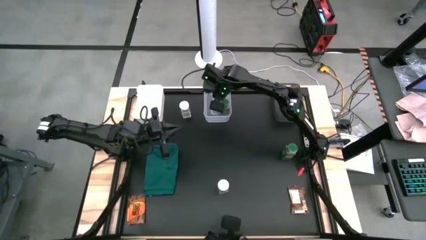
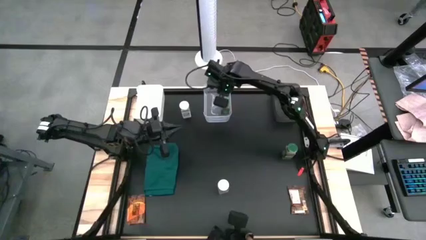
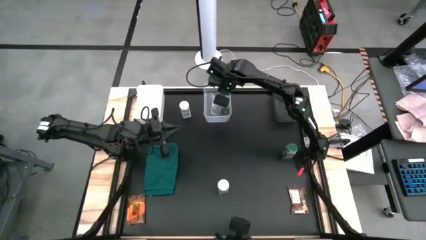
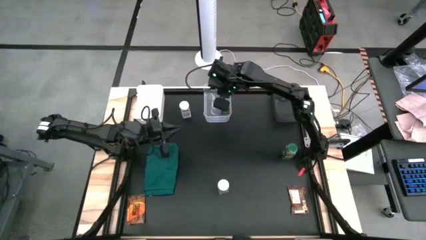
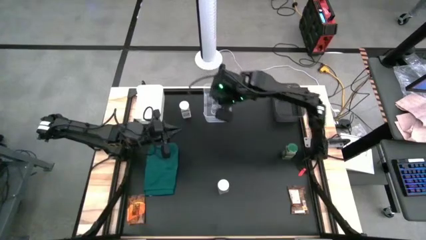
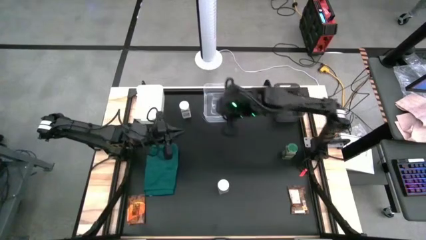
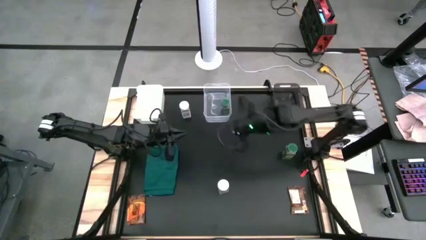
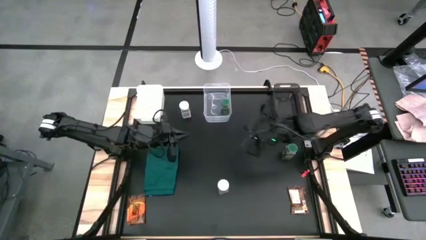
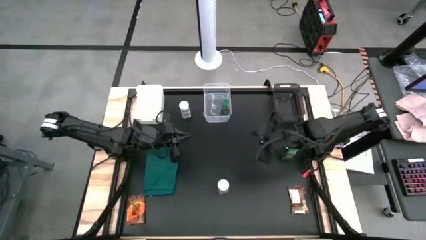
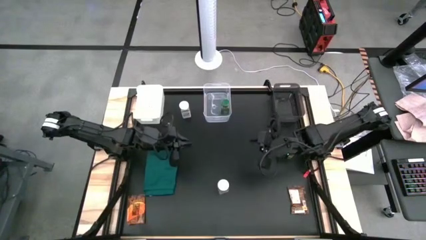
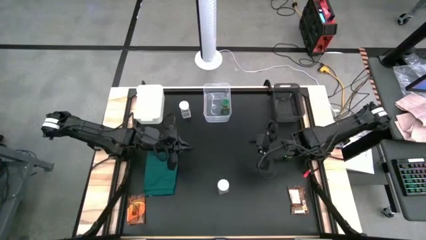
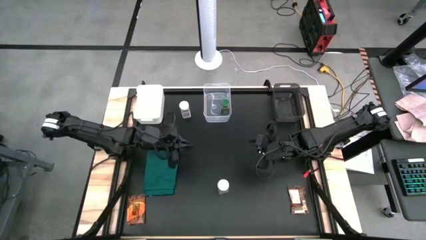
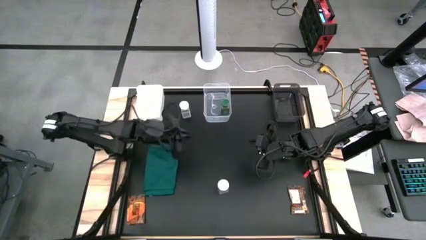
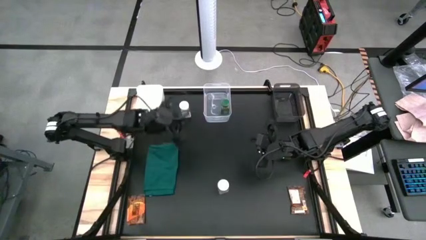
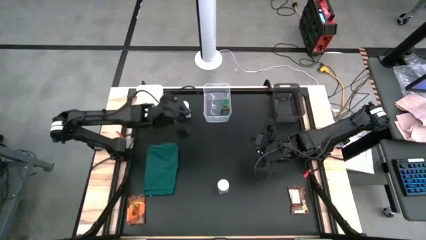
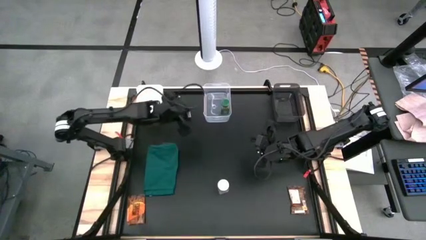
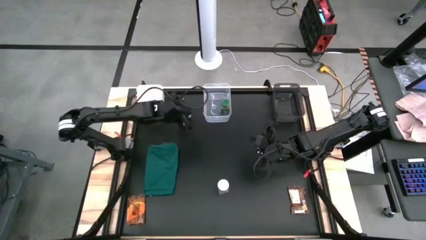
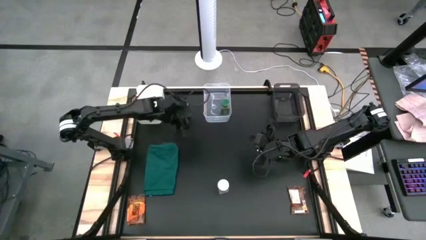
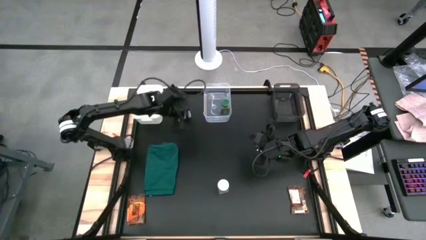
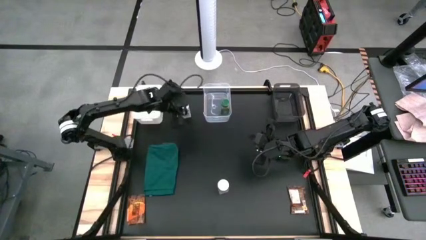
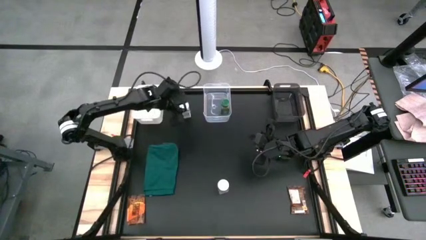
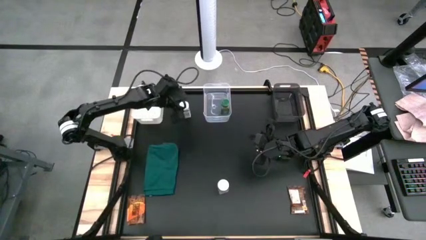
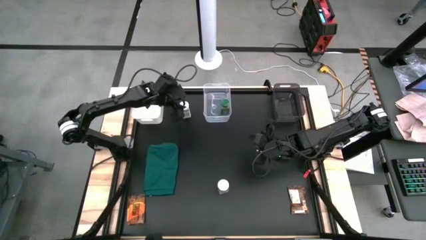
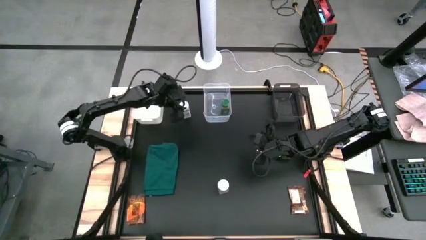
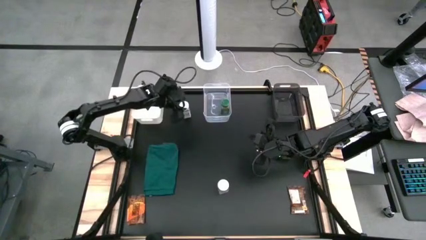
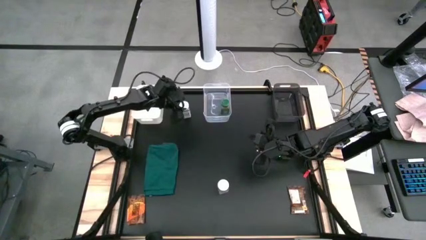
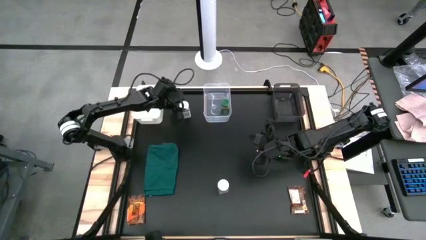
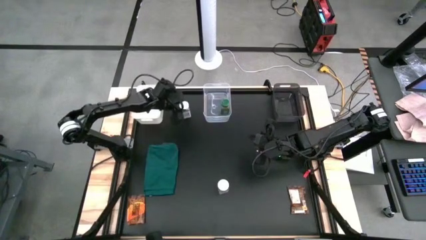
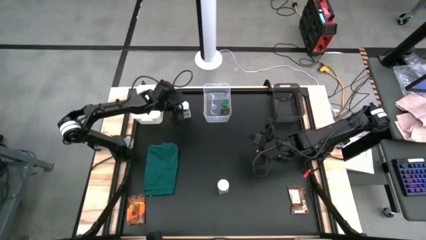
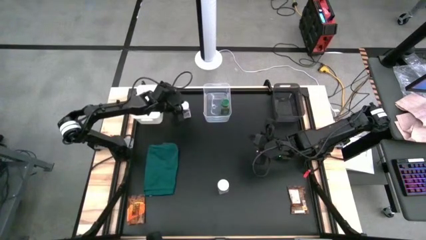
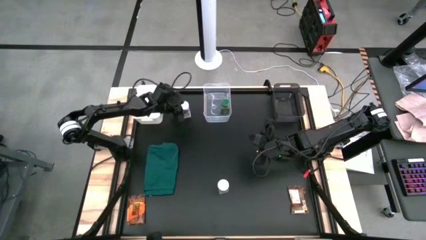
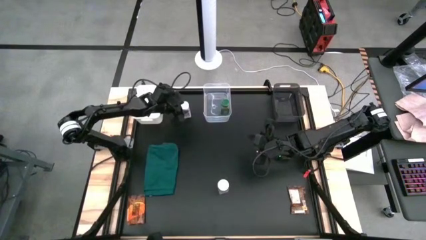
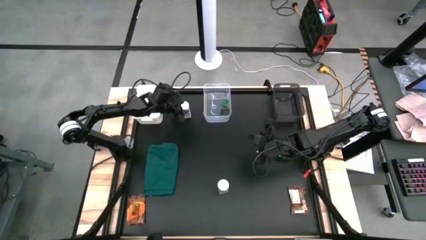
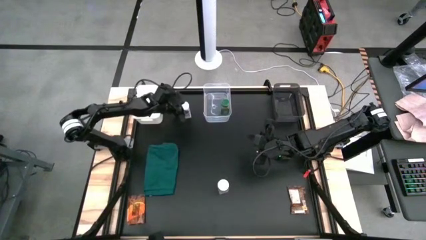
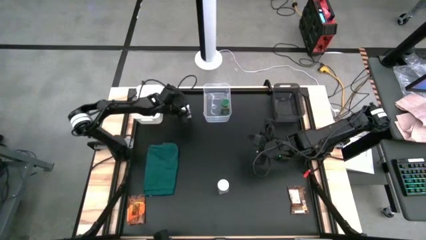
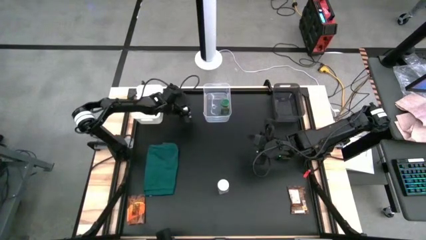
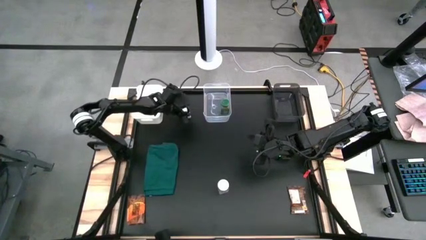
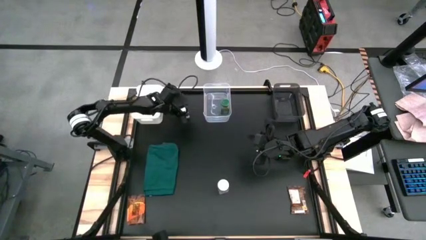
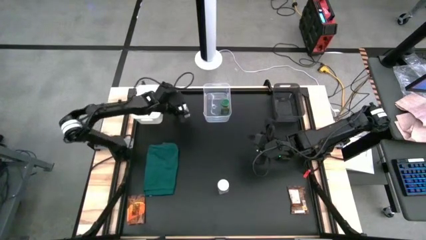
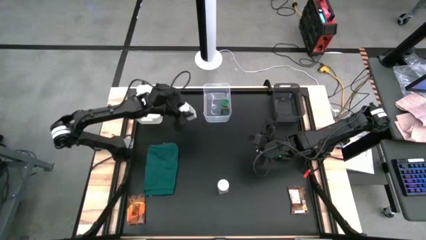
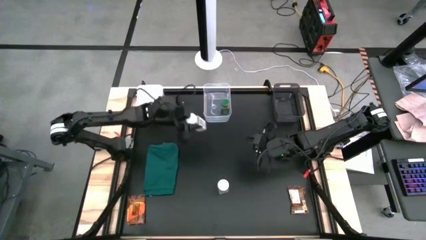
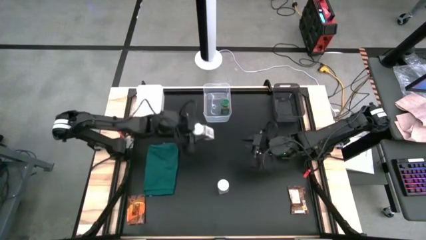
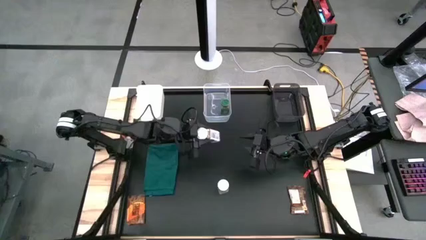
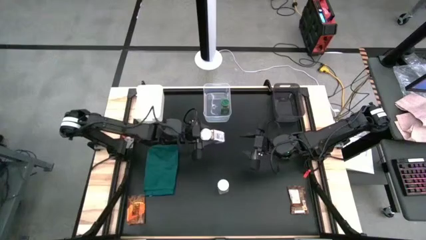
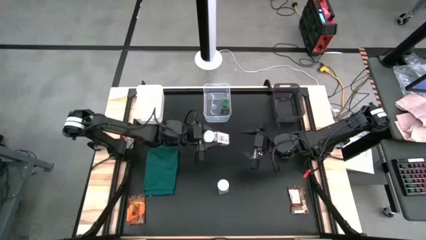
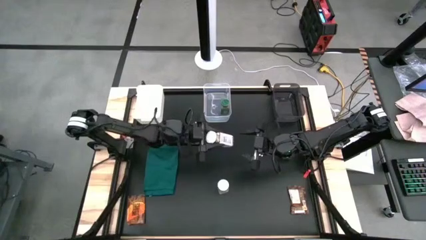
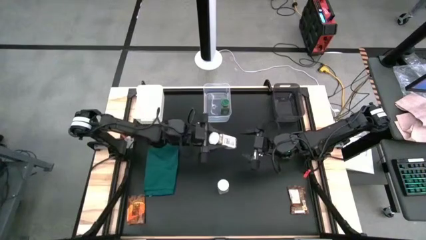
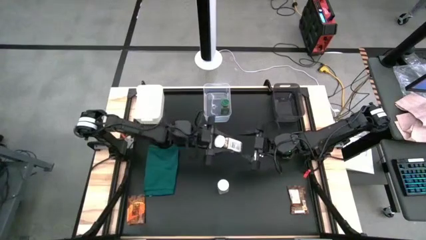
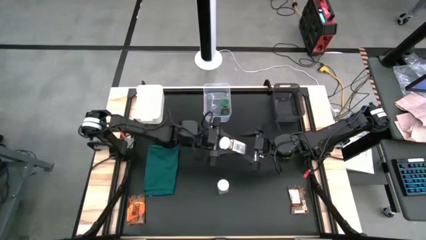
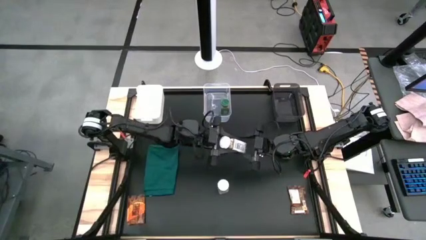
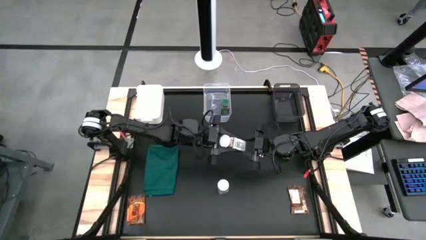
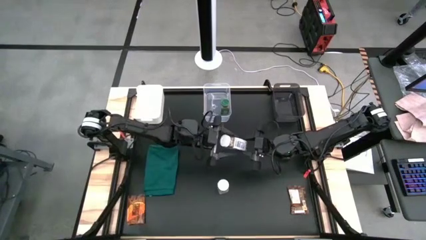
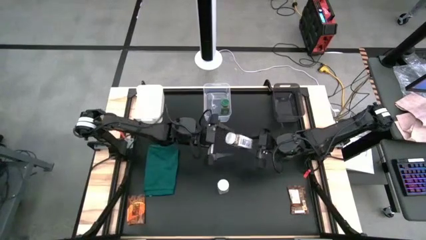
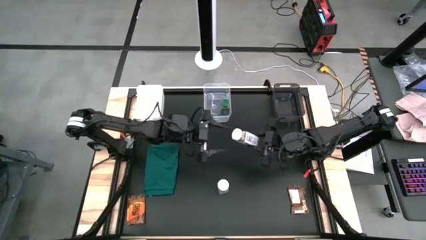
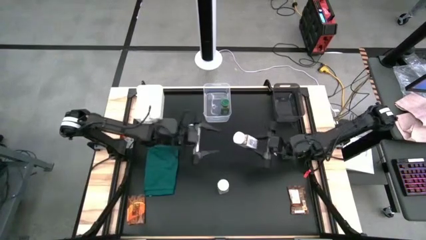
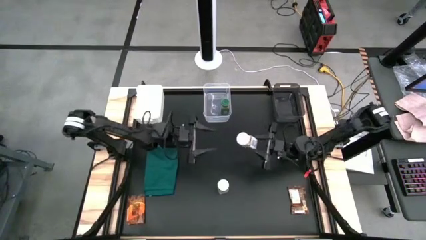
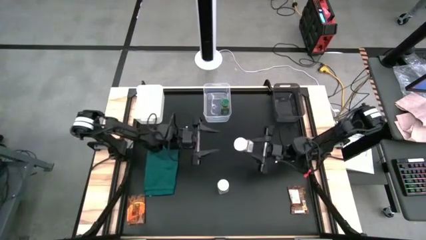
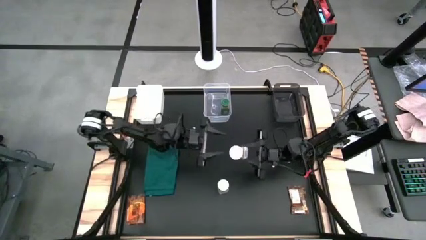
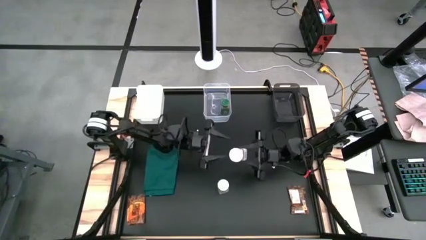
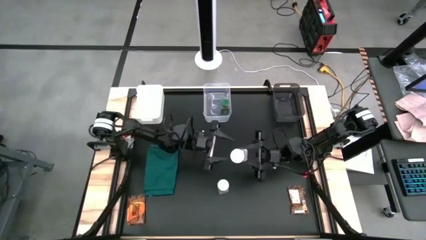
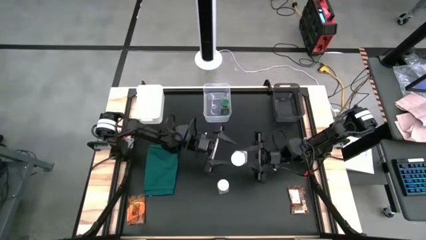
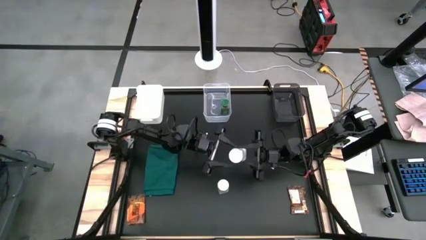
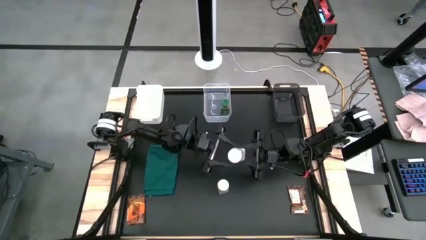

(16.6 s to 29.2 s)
Task: Sort spices by type
Put the top white seasoning bottle into the black bin
